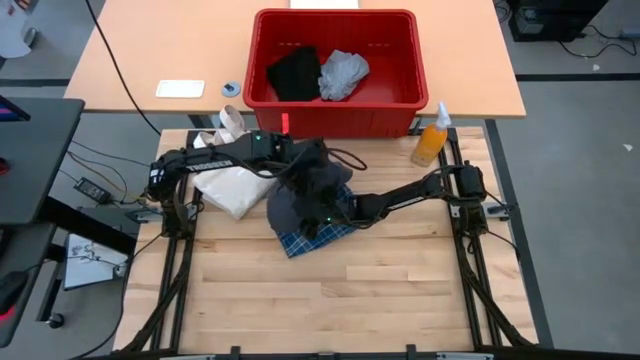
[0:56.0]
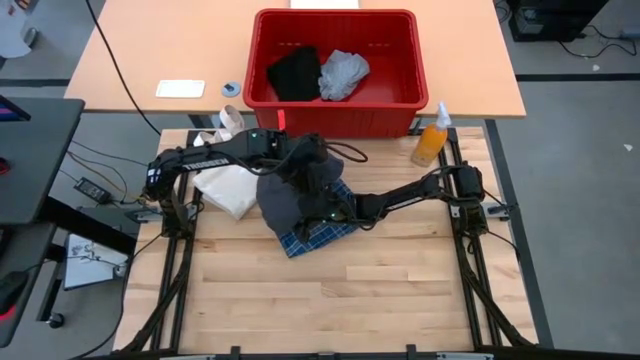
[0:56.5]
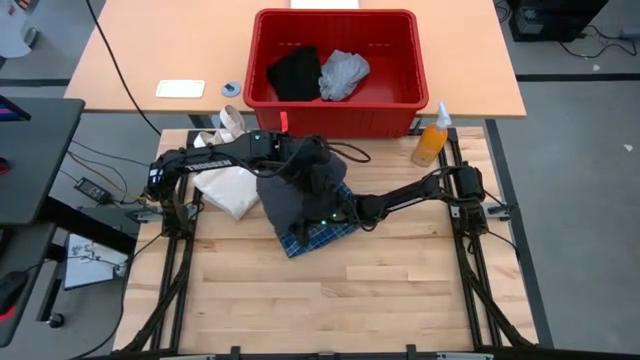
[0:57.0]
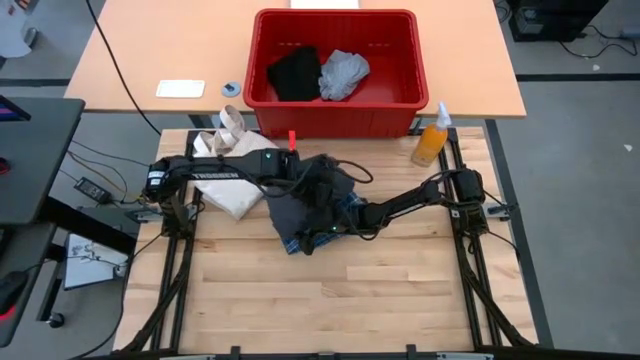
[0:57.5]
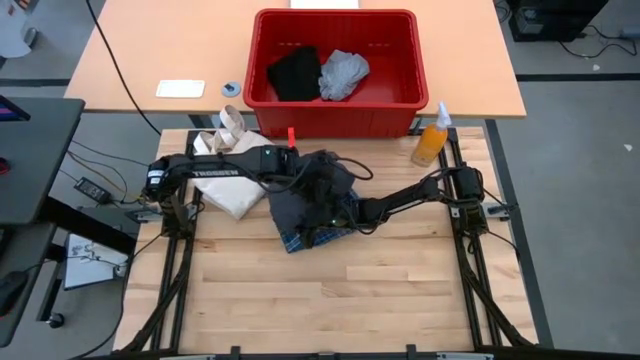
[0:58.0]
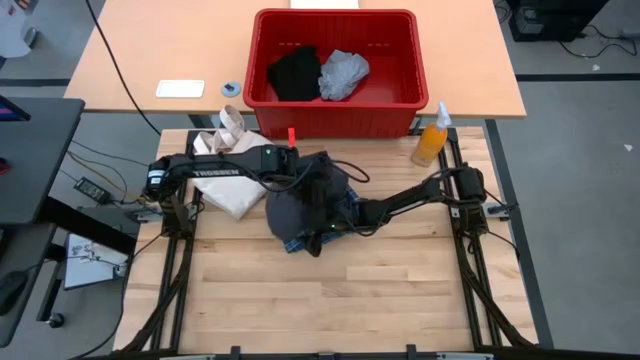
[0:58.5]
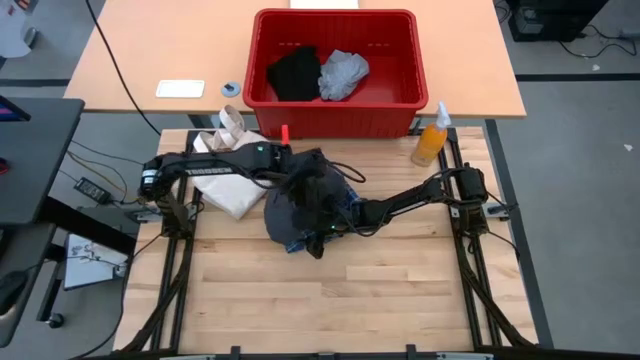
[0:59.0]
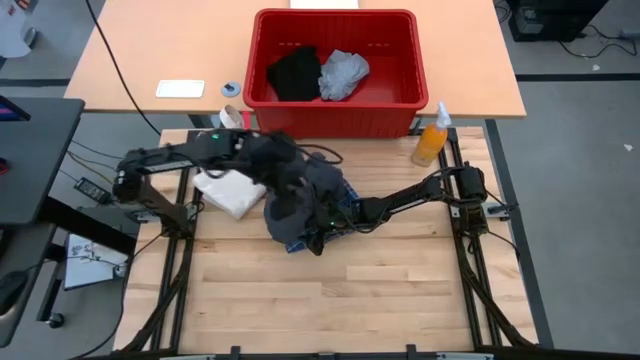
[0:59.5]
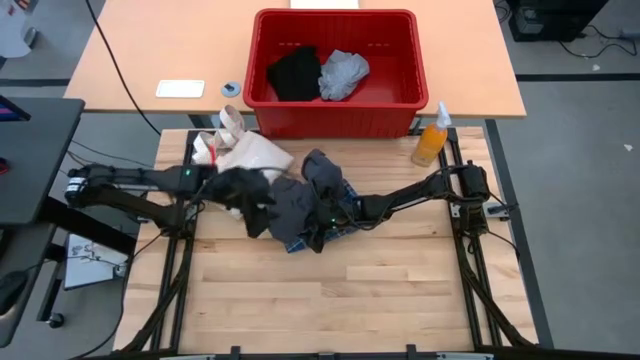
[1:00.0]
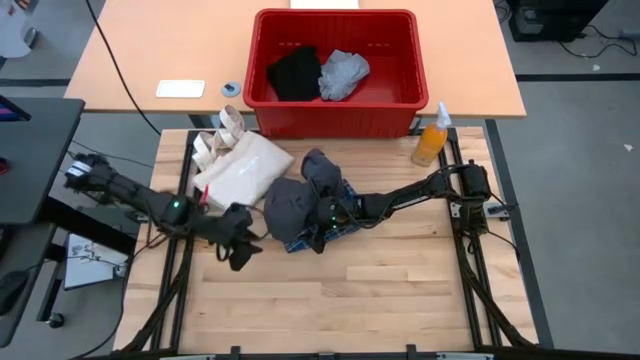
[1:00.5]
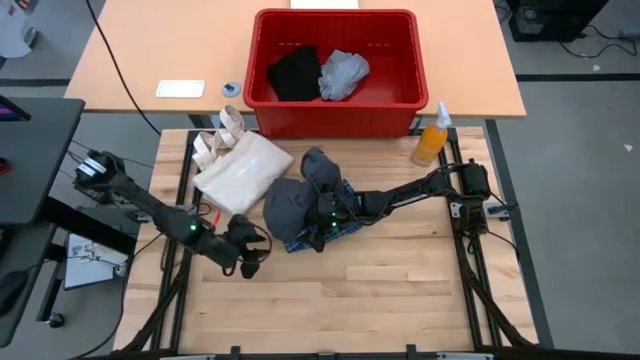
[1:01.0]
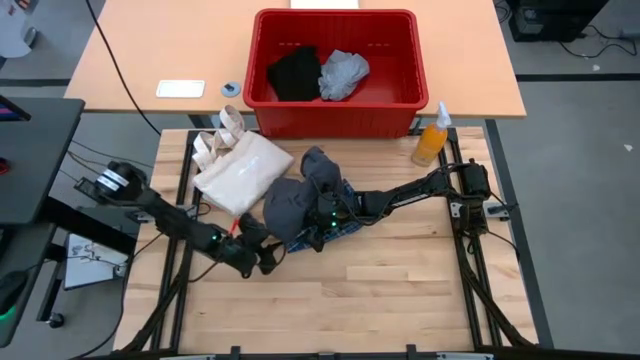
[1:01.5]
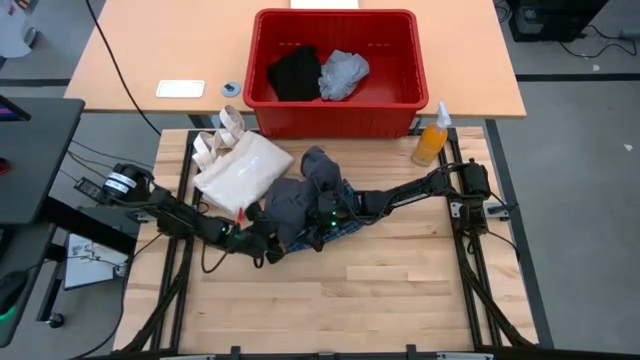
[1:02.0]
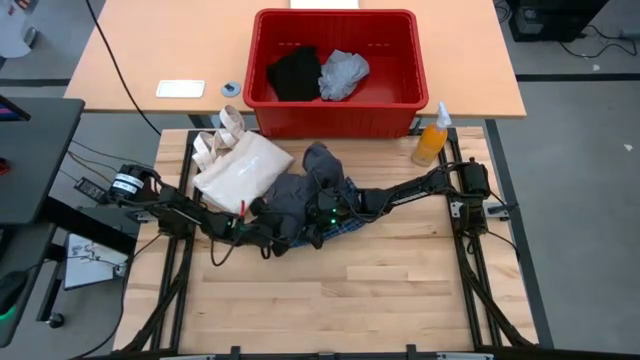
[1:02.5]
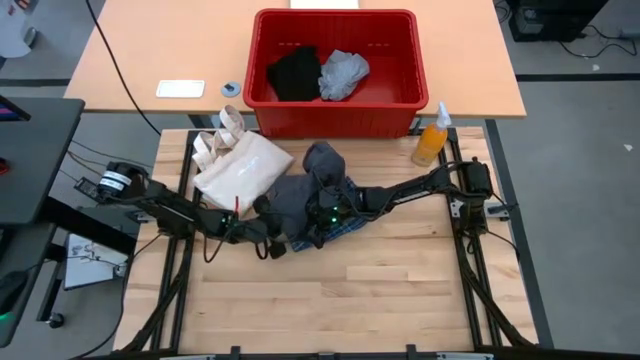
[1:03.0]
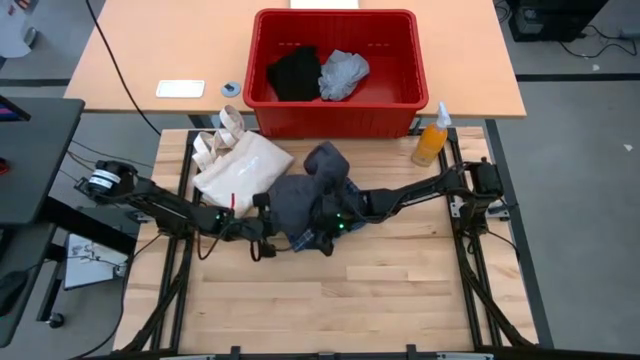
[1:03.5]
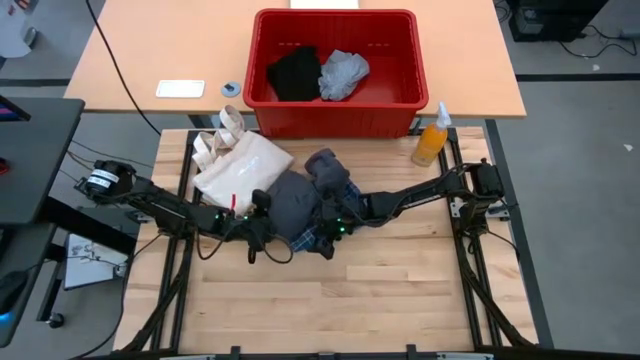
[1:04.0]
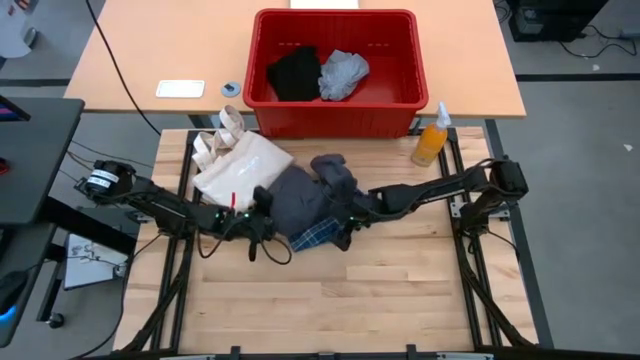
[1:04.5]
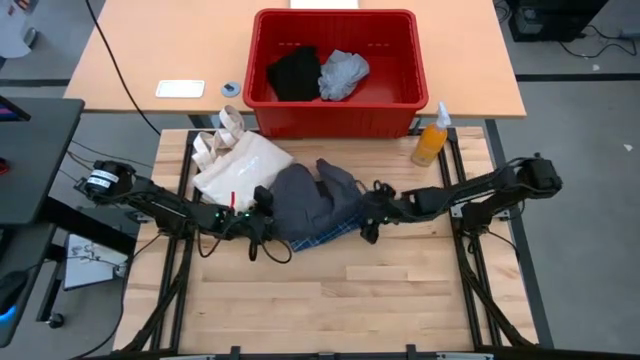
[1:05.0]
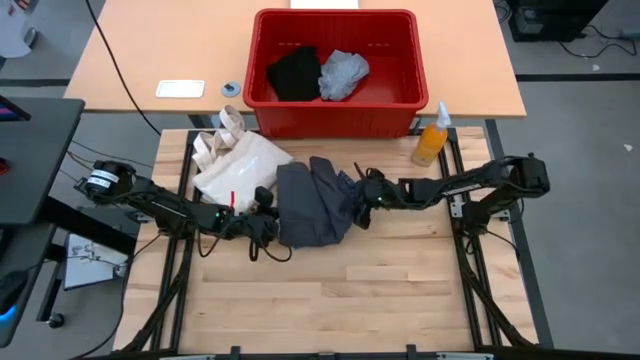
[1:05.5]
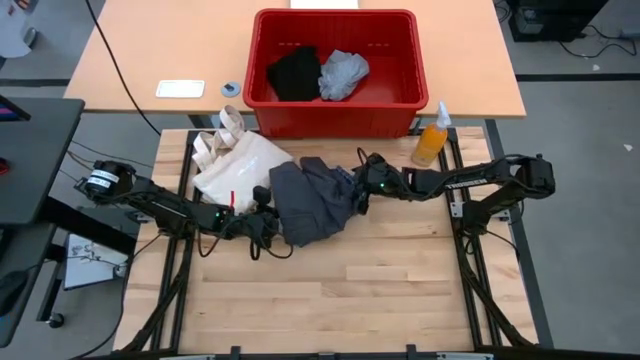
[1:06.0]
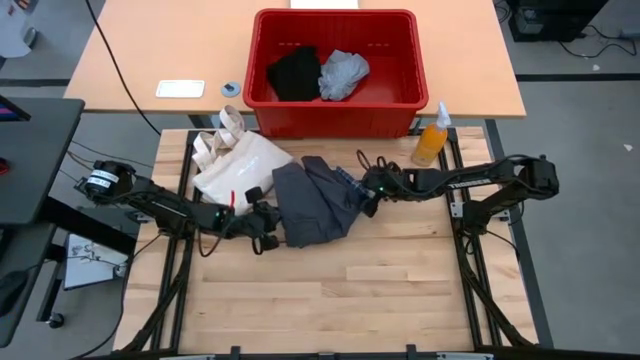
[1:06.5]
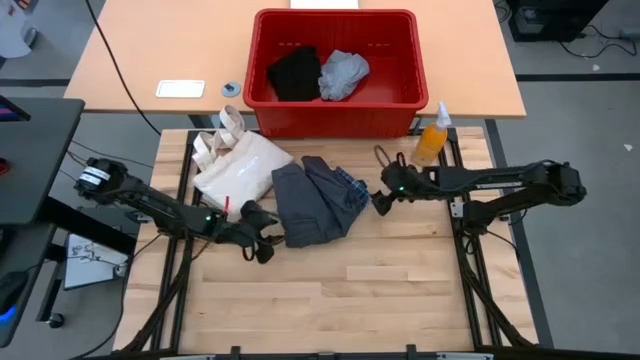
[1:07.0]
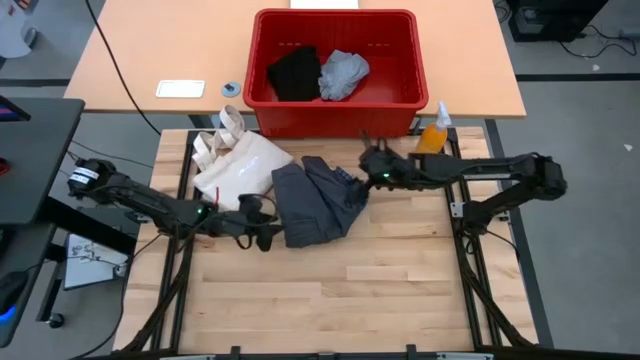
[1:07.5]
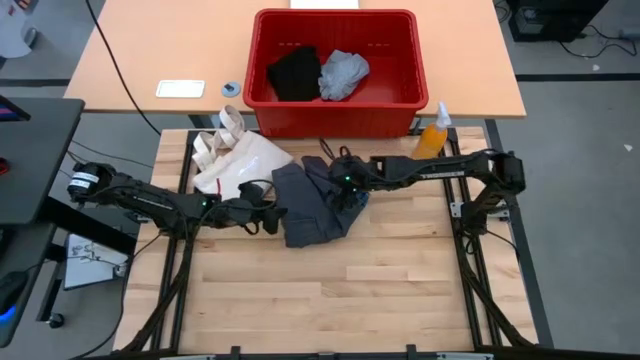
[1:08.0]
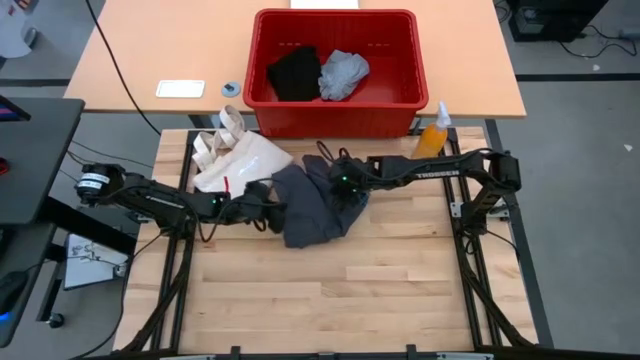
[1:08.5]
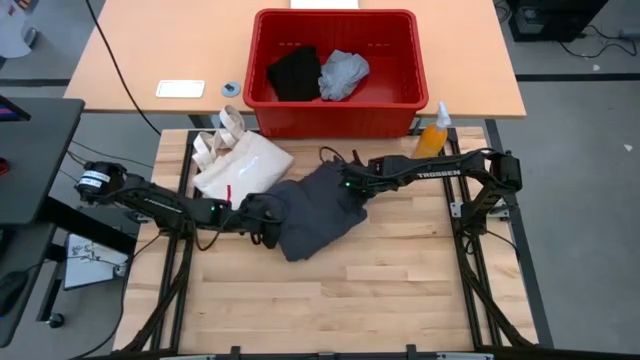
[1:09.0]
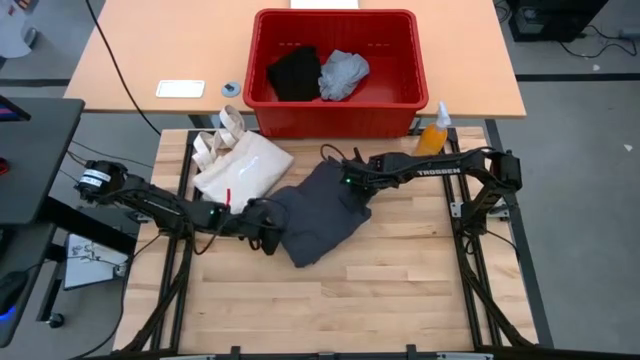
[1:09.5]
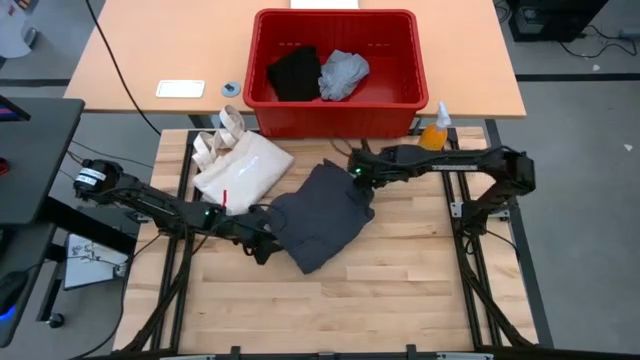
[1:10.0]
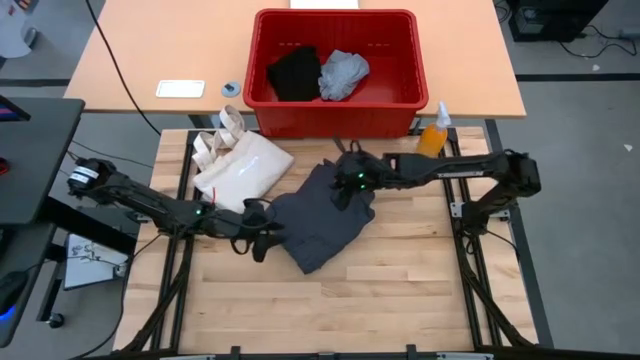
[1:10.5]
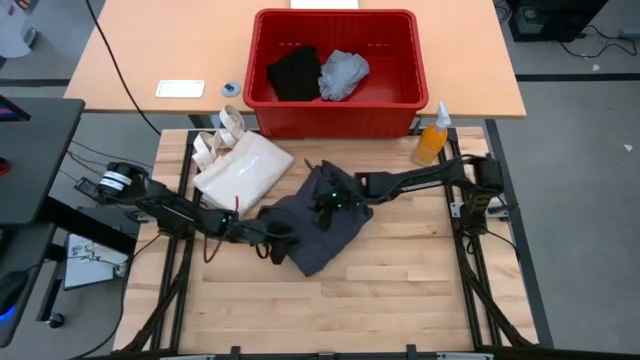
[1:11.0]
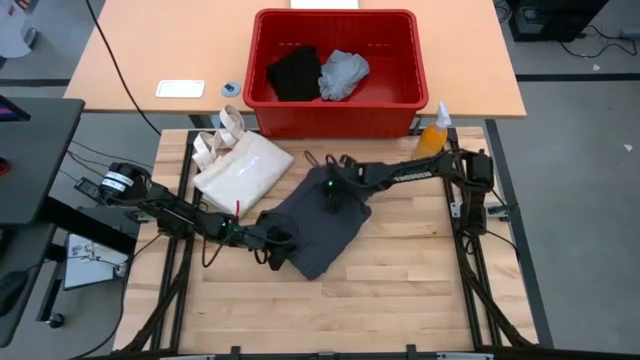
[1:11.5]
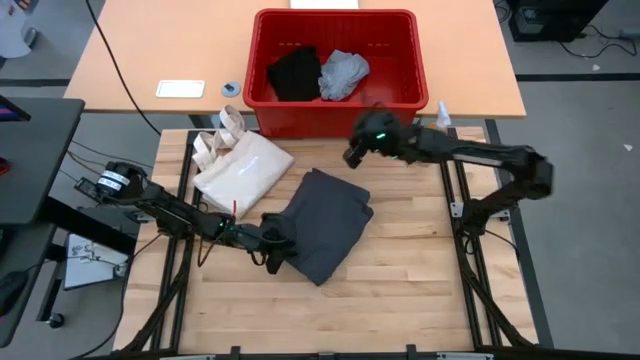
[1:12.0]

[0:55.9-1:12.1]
Task: Fold Laundry from Bin
Remove the dark gray shorts from the red organizer bin

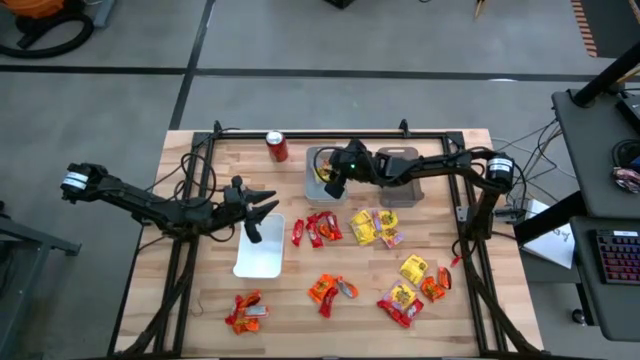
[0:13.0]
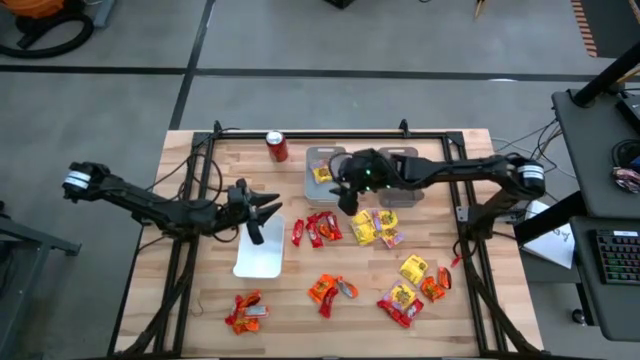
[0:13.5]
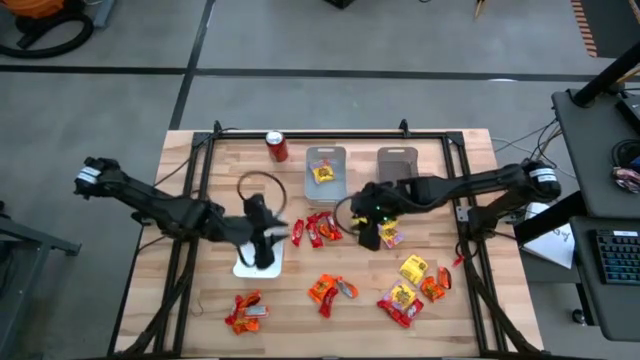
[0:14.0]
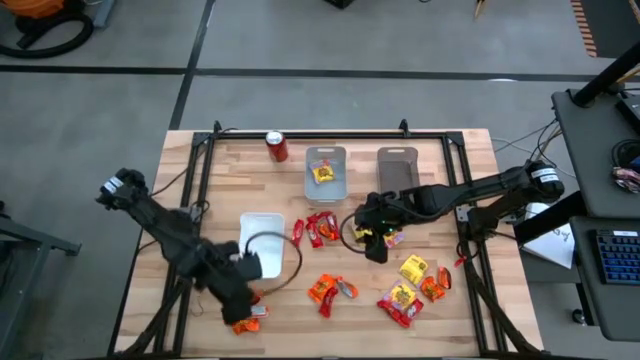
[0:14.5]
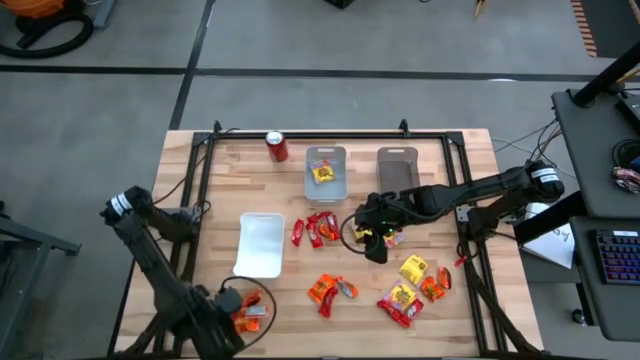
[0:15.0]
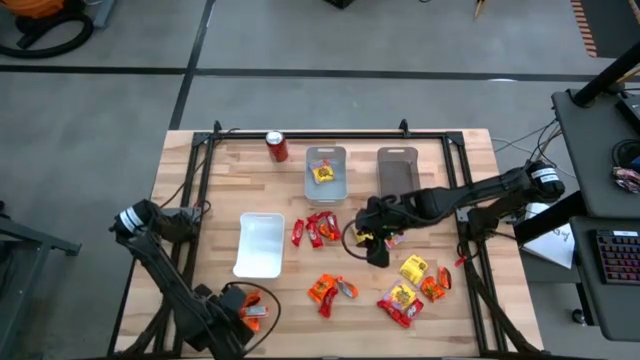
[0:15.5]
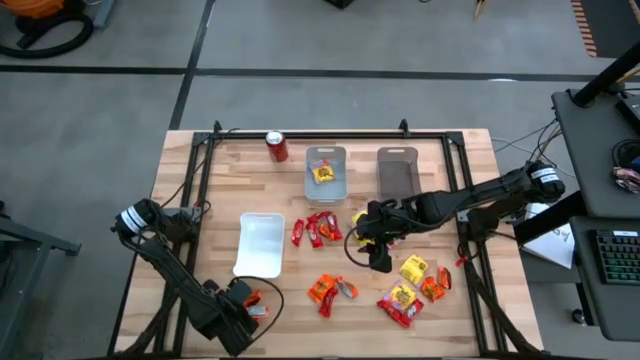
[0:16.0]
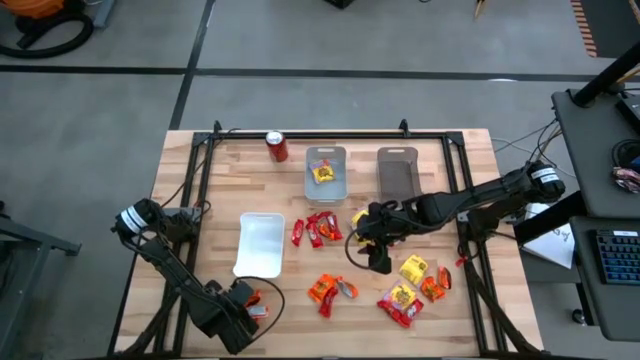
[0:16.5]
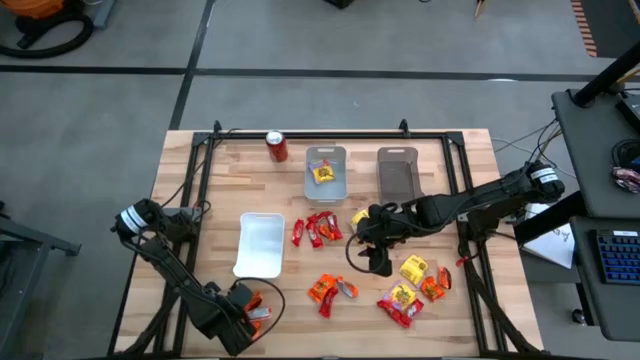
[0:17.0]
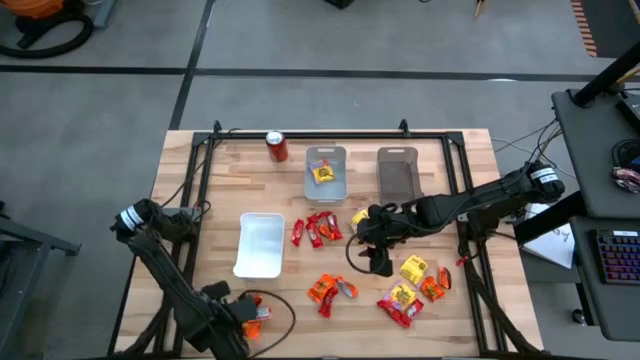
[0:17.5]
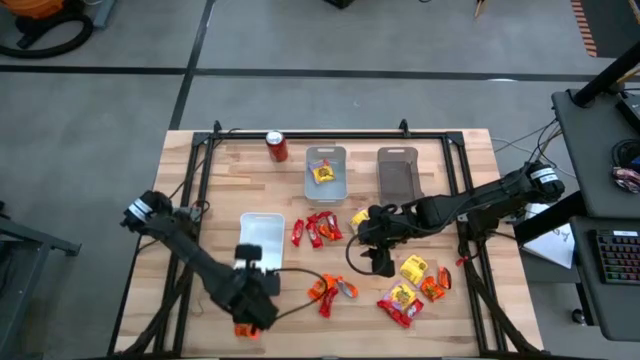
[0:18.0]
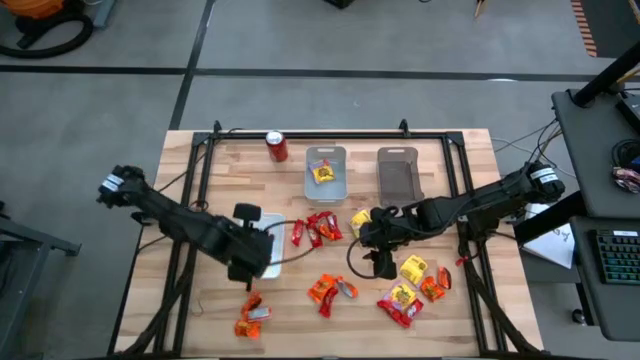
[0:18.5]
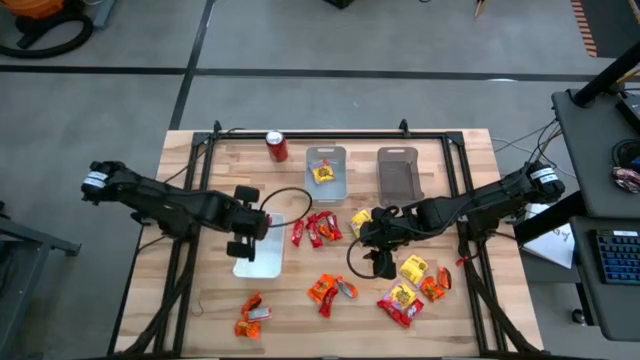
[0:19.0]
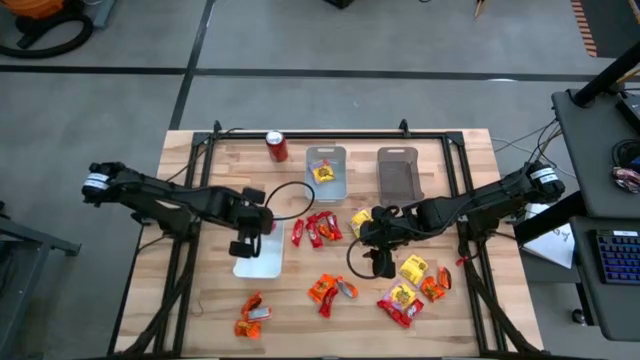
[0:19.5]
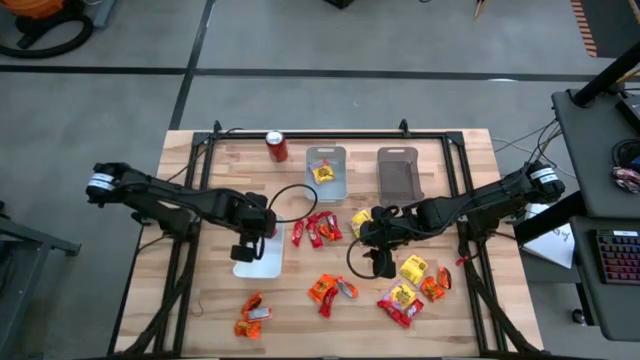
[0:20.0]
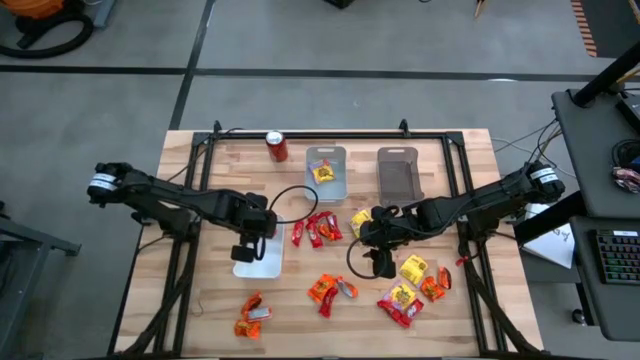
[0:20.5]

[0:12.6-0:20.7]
Task: Sort candy
Put the red candy into the white bin
